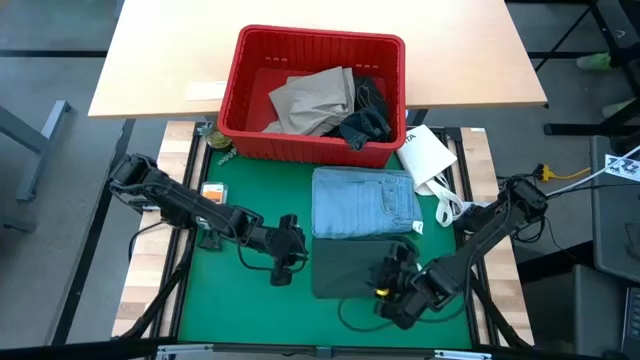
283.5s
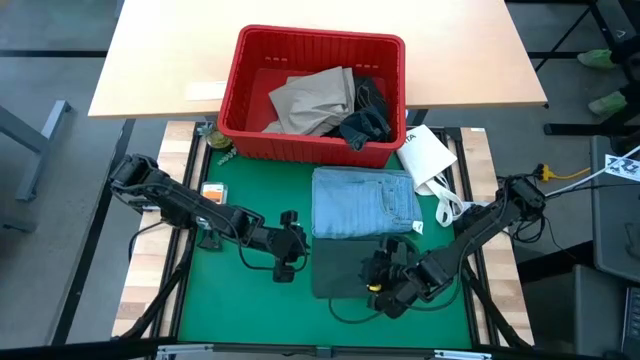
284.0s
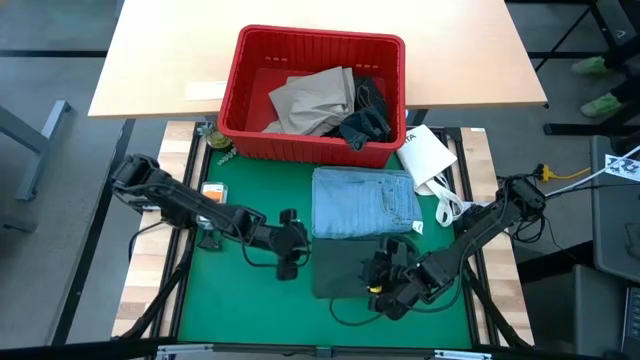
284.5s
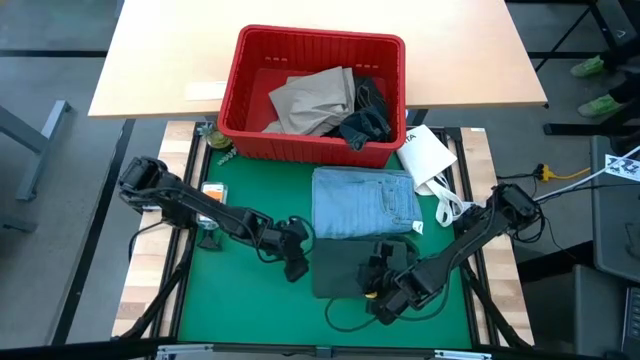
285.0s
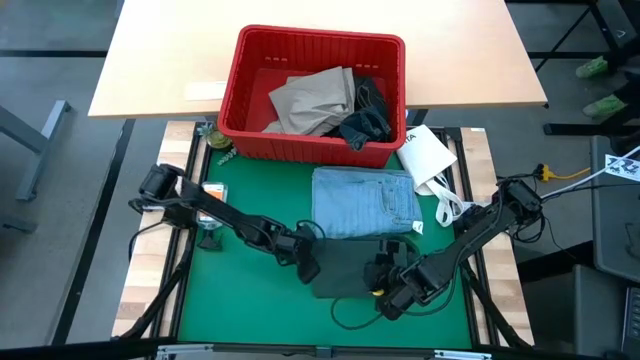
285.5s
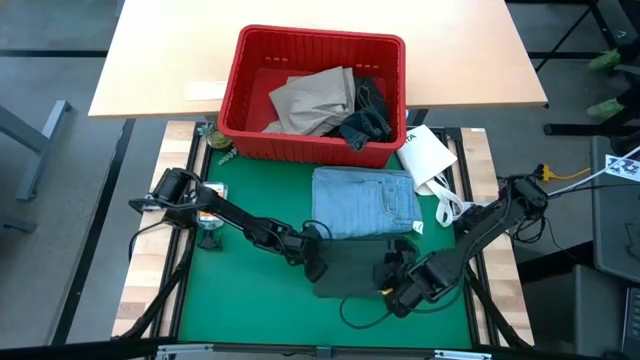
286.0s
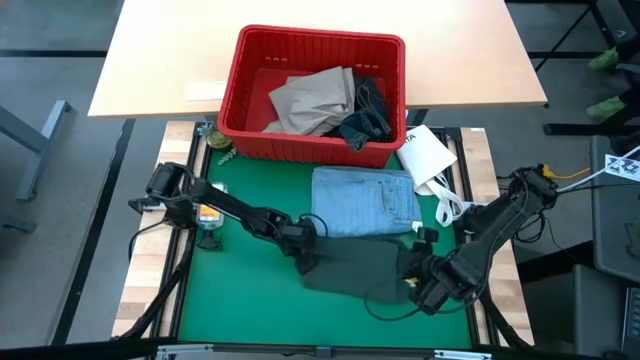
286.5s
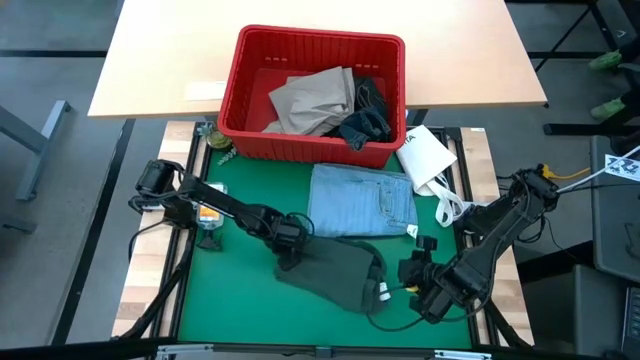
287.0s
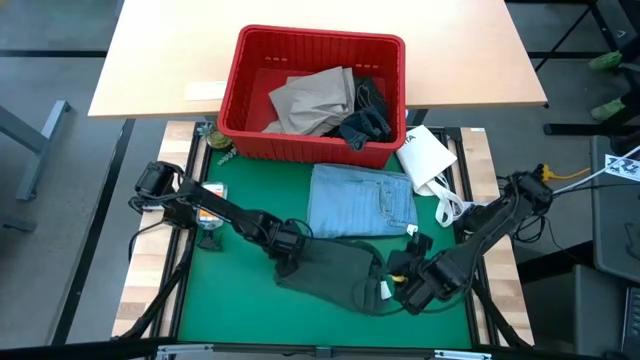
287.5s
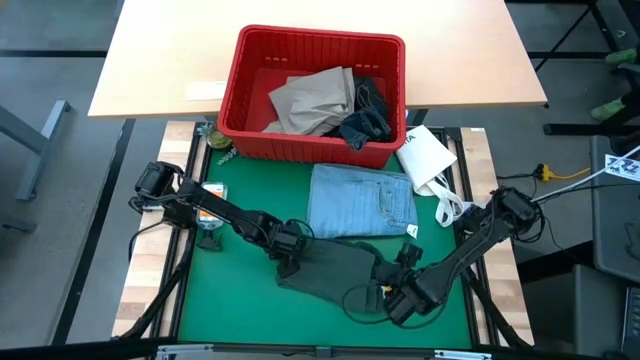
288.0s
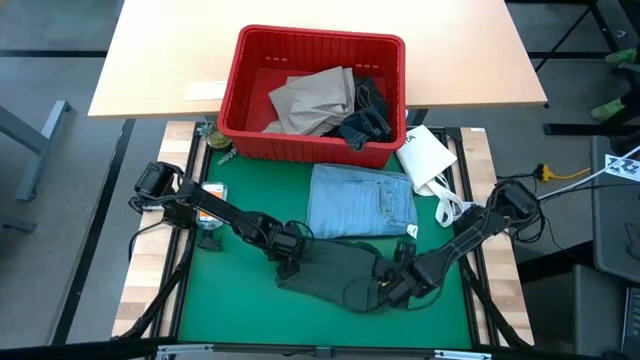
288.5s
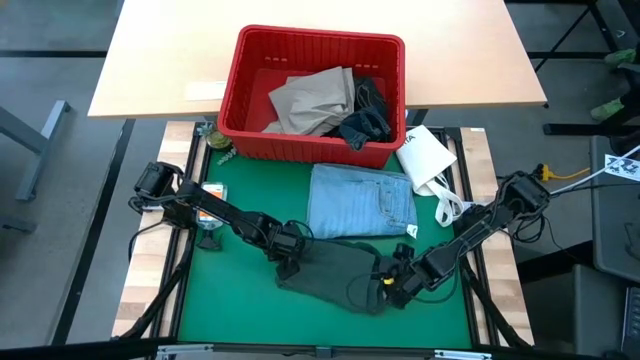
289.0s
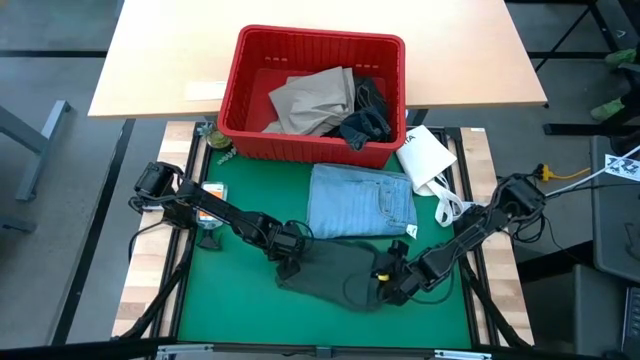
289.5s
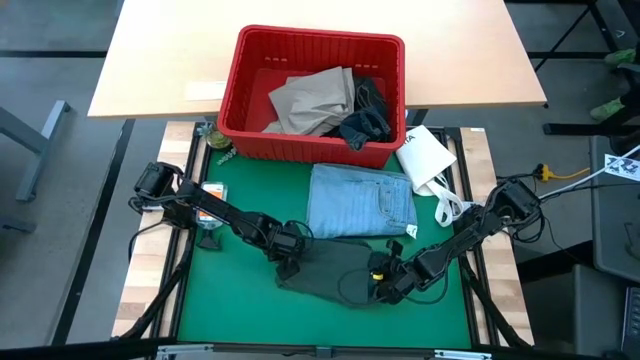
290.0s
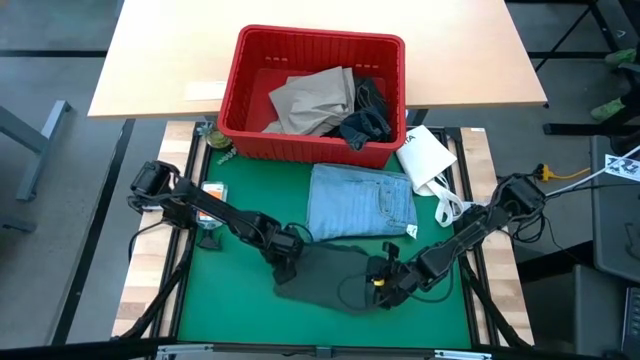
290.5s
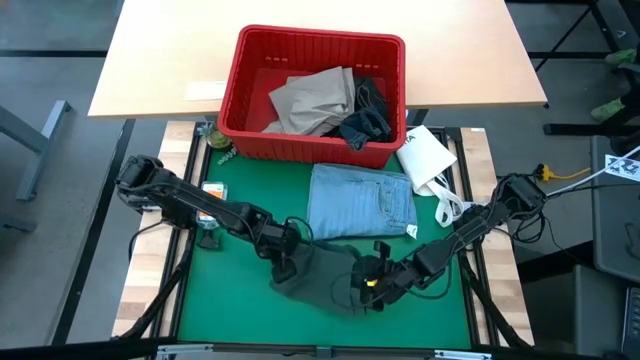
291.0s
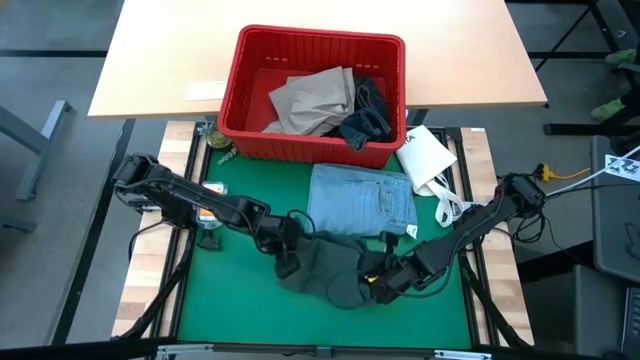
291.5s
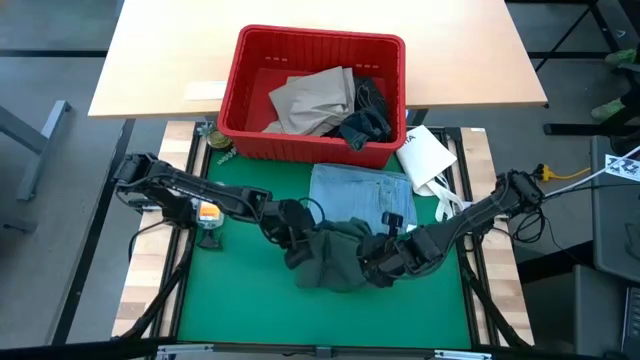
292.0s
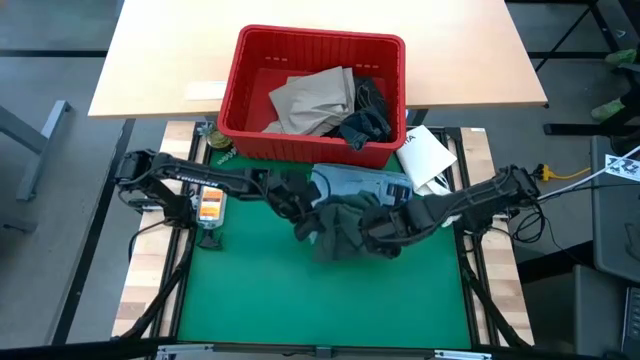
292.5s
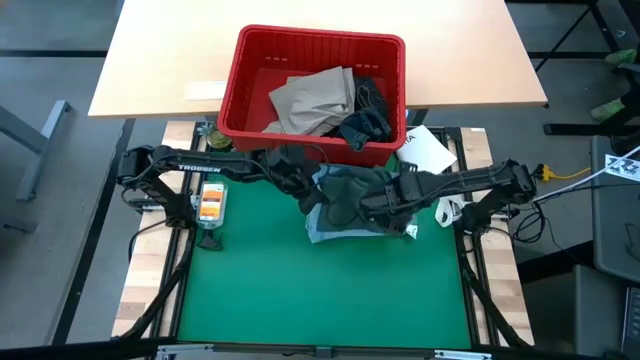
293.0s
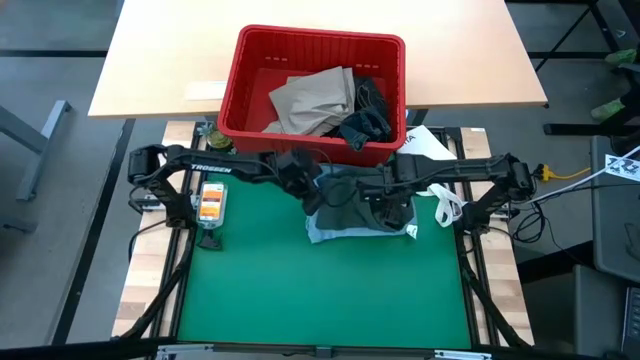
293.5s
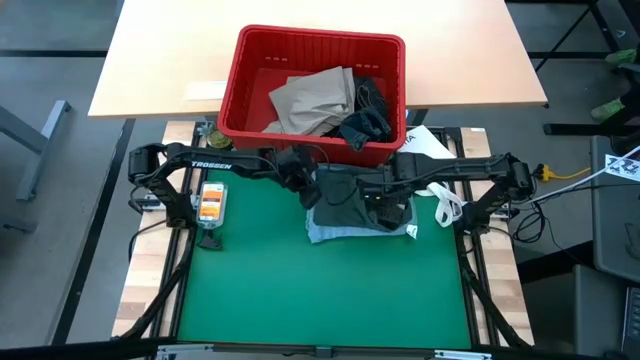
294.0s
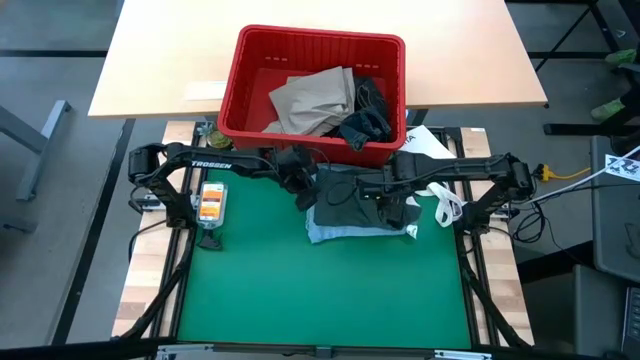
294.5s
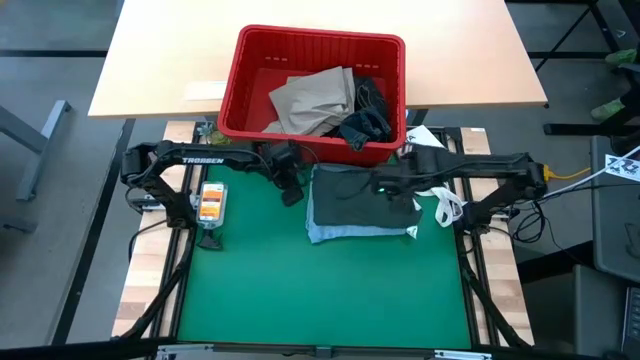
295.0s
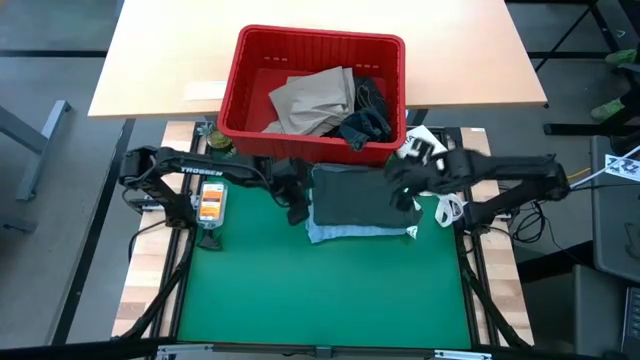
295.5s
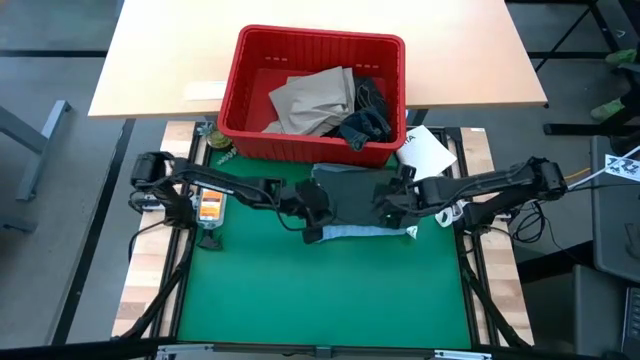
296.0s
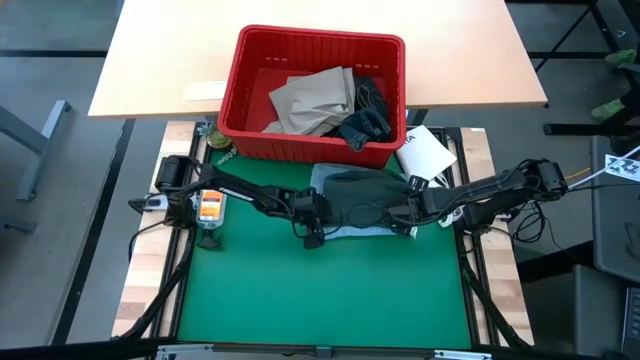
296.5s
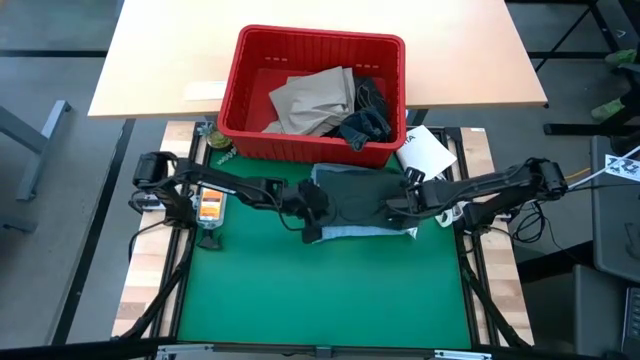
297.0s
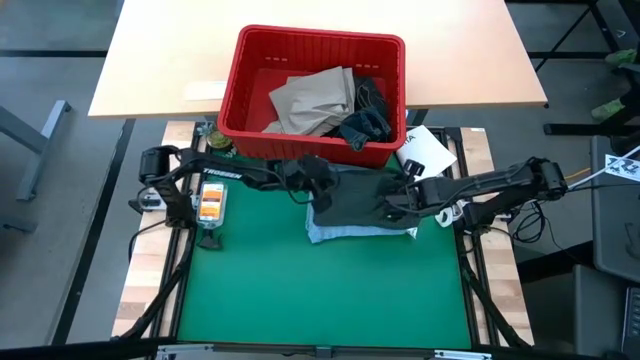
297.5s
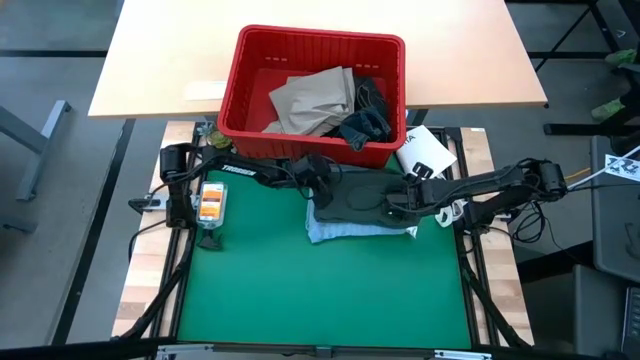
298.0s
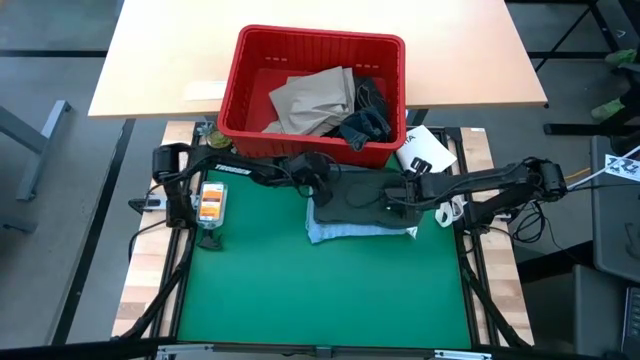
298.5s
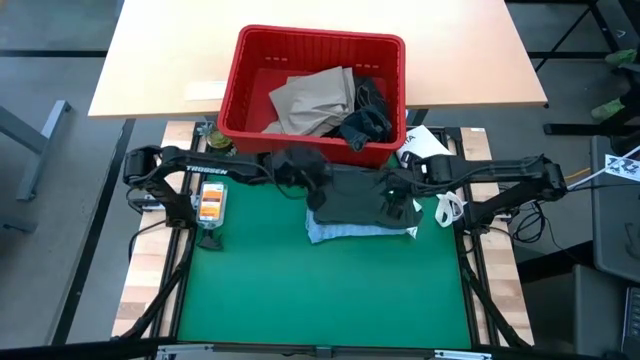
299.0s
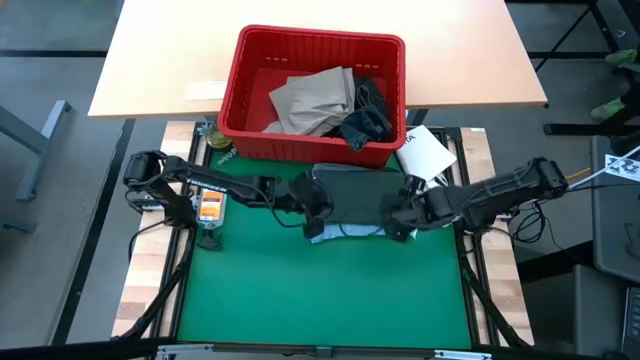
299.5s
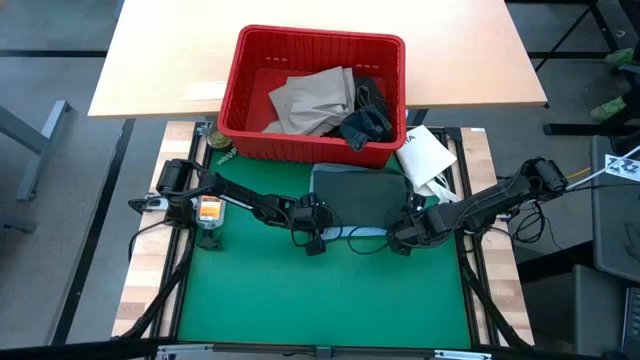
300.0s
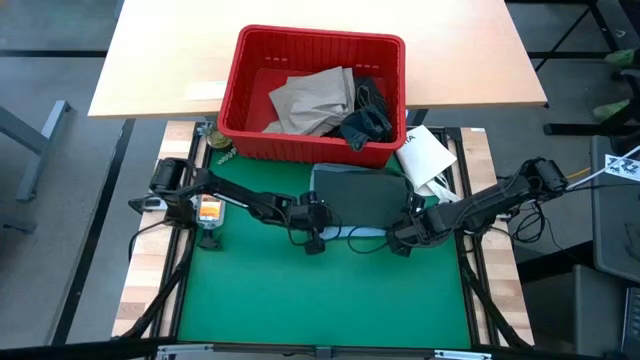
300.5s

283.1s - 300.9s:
Task: Fold Laundry from Bin
Stack the folded green polo shirt on top of the folded blue pants

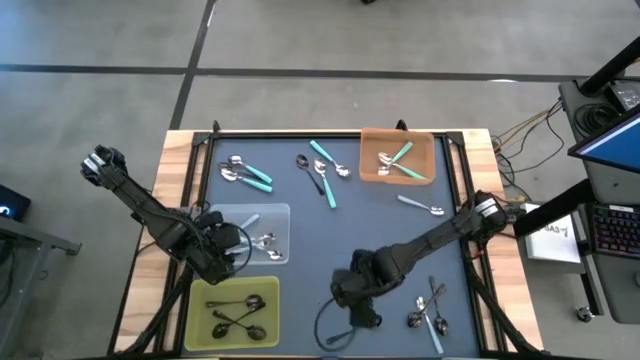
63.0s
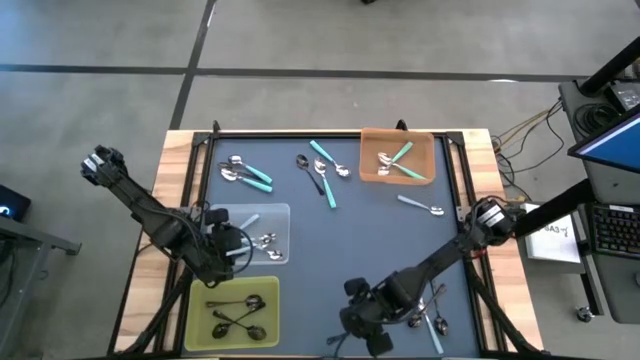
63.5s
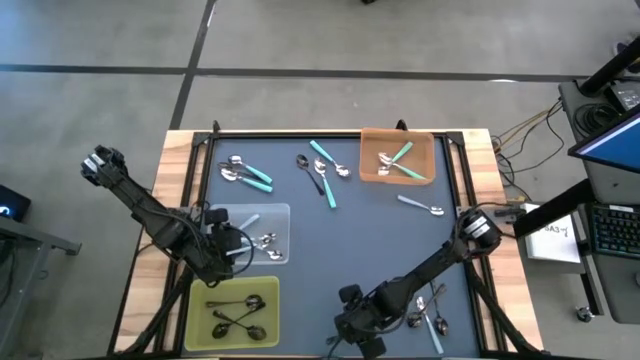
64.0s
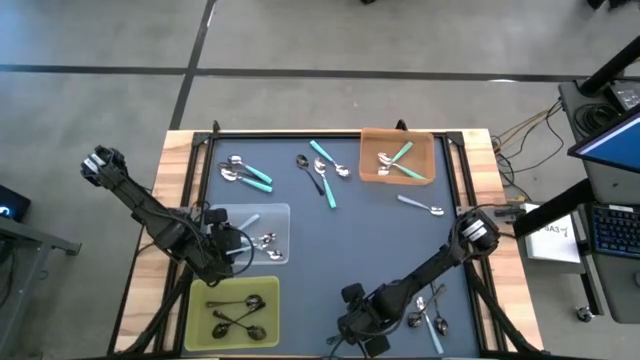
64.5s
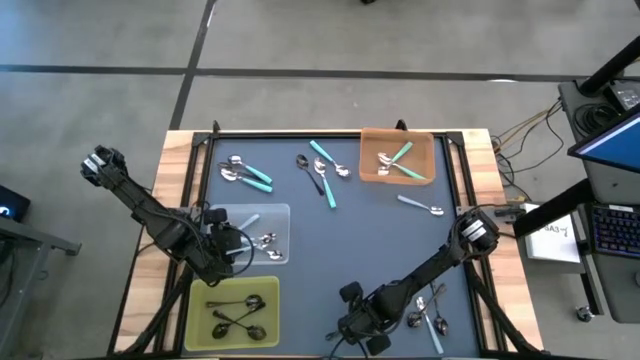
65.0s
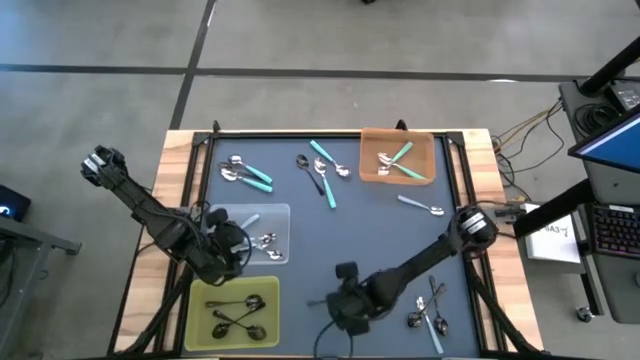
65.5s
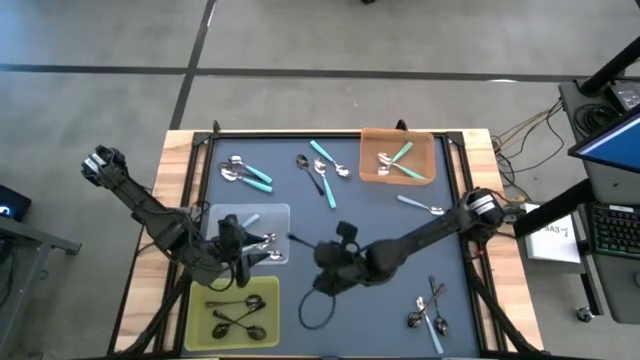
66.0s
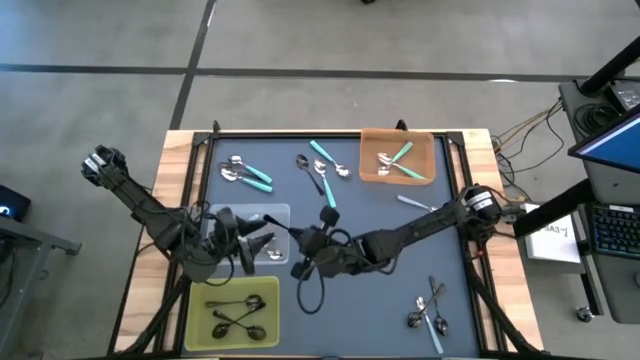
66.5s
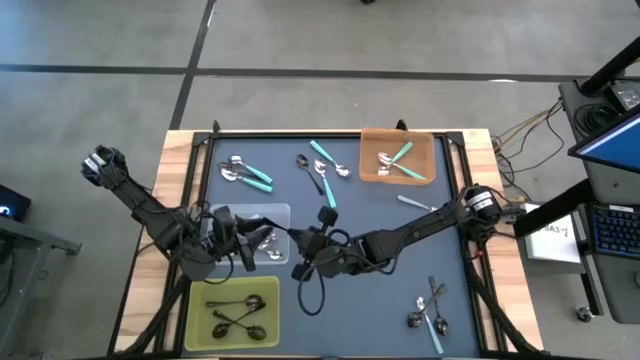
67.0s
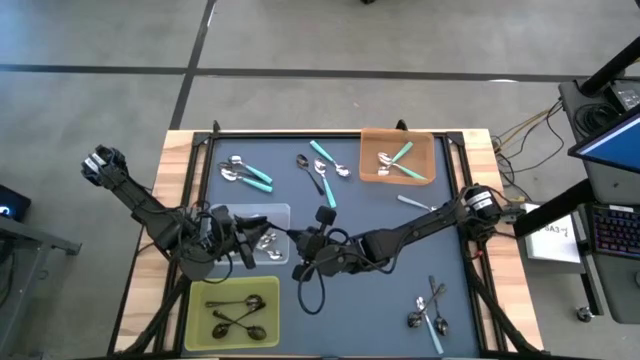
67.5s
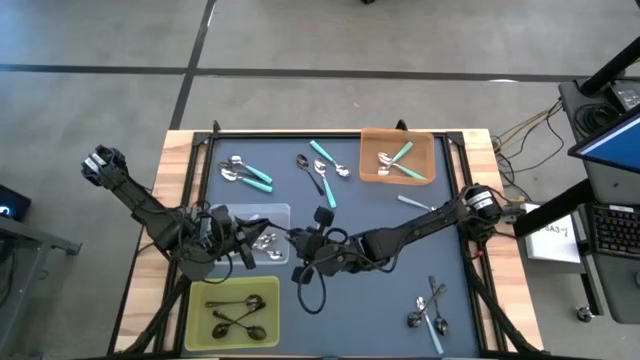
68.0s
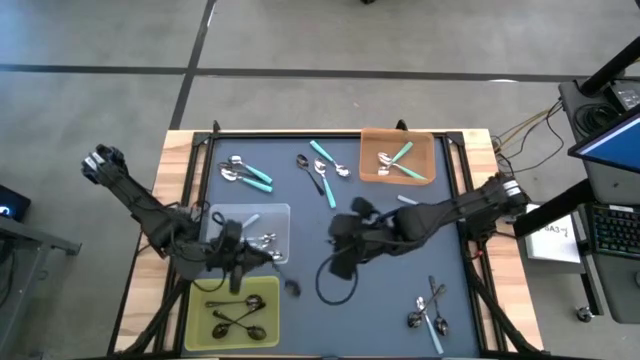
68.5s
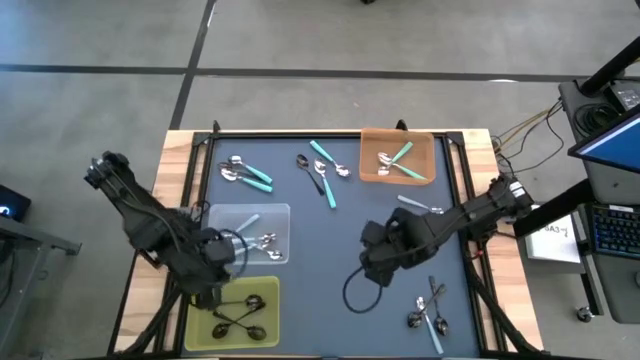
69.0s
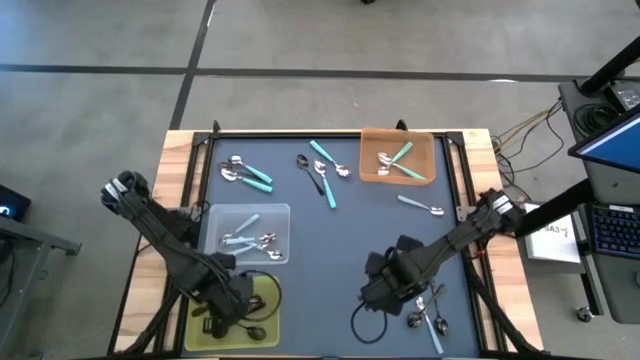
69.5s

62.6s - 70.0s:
Task: Sort silverware by color (type)
Put the black spoon into the yellow bin
